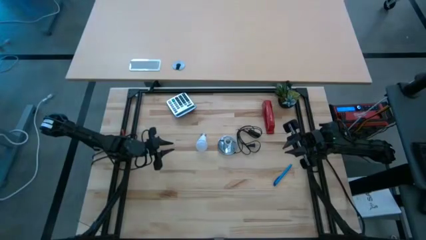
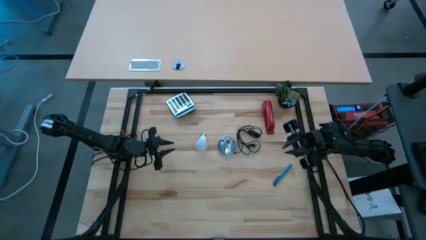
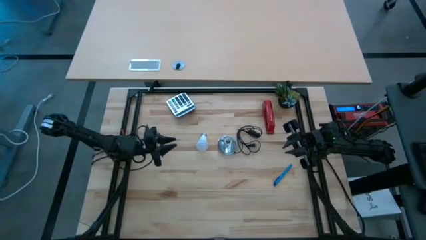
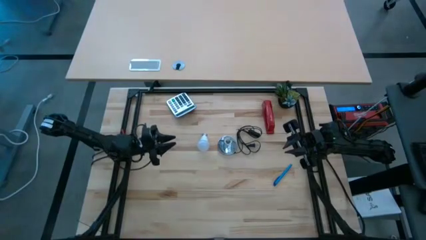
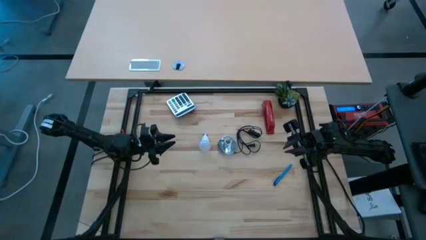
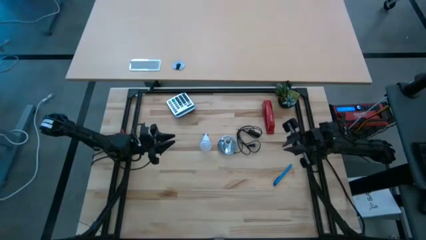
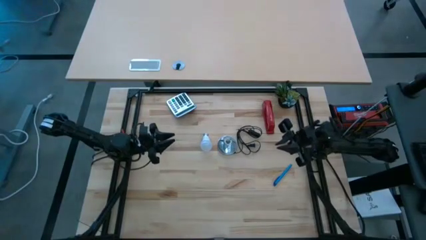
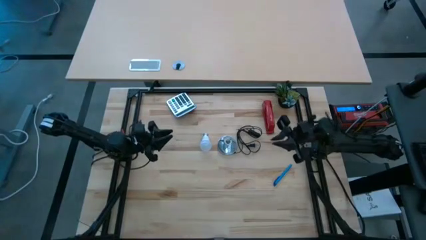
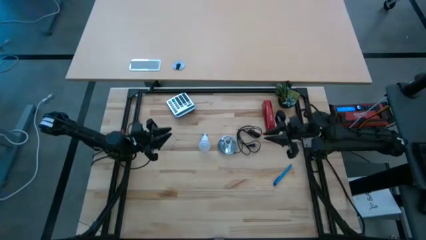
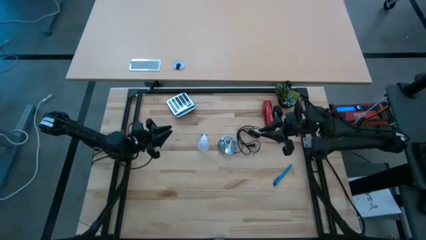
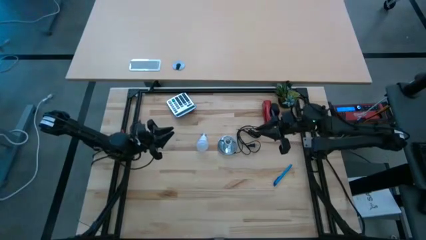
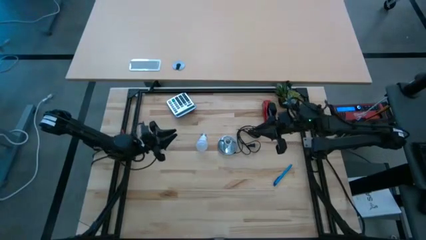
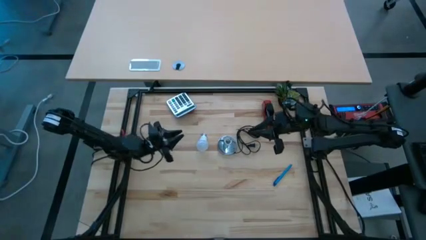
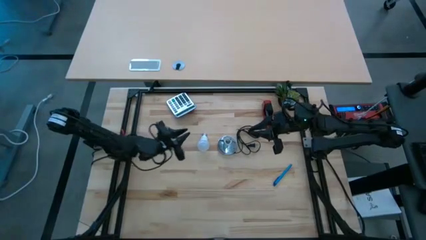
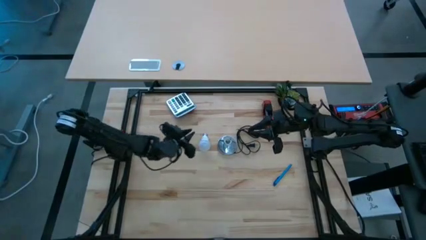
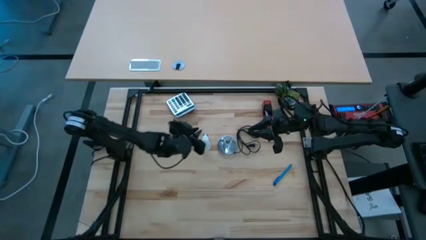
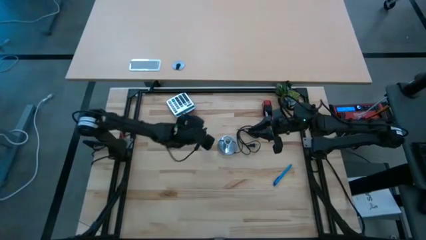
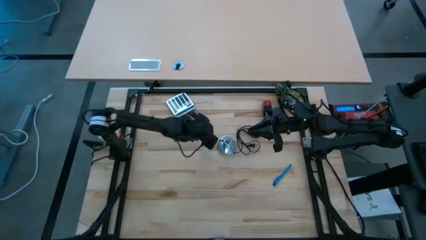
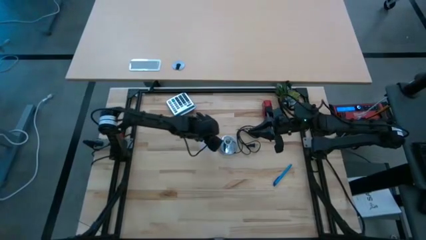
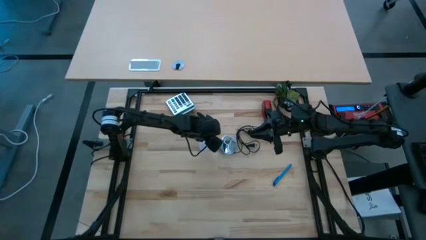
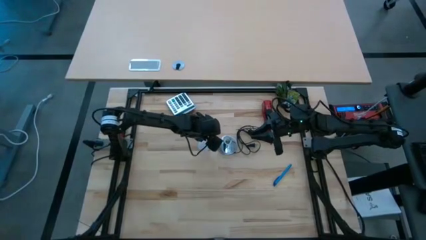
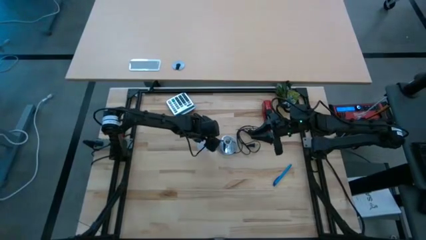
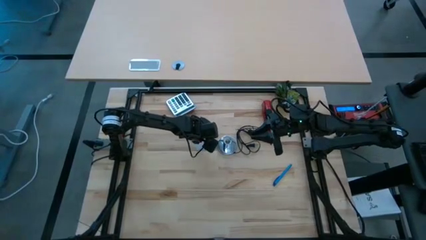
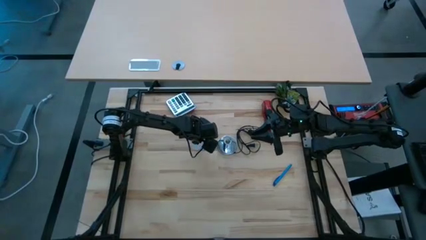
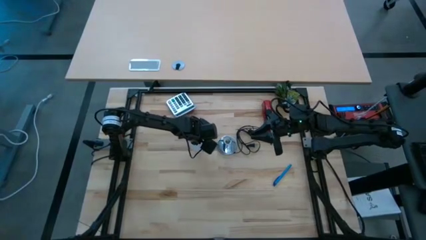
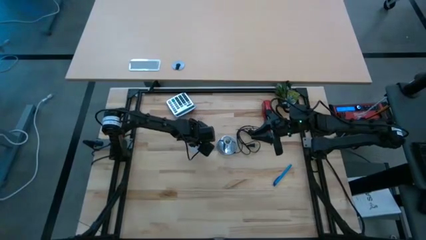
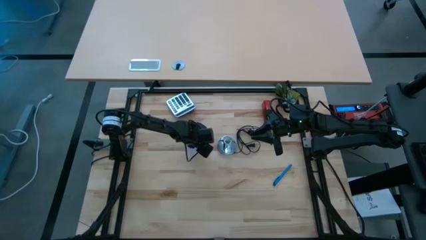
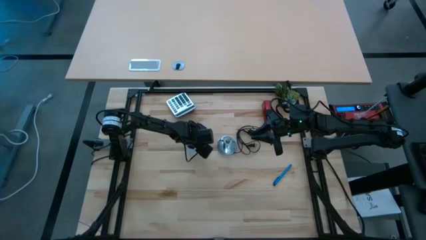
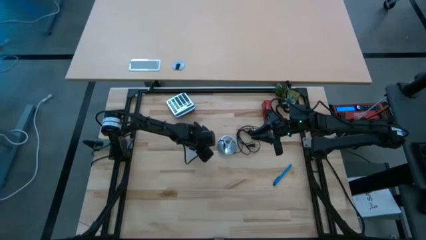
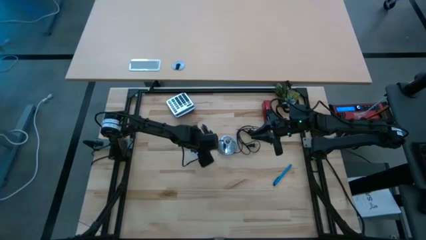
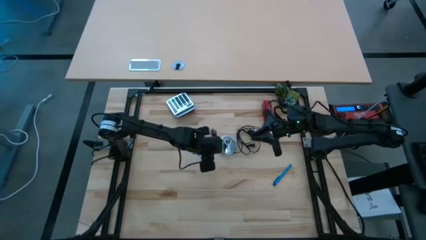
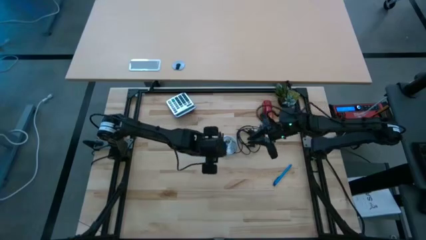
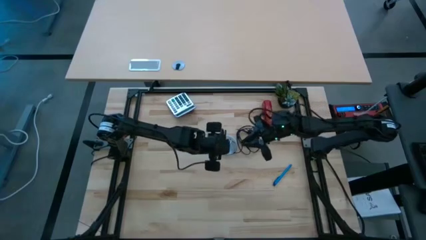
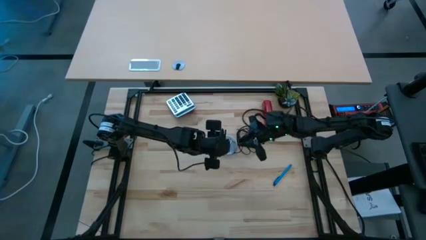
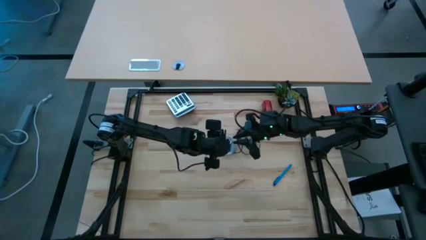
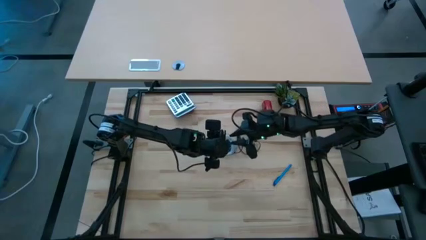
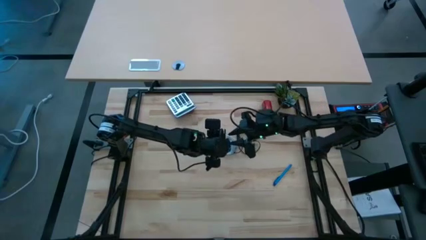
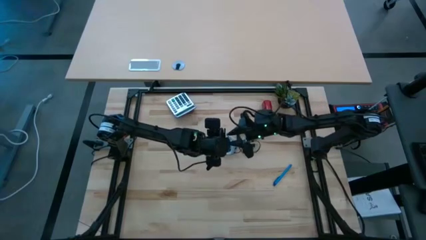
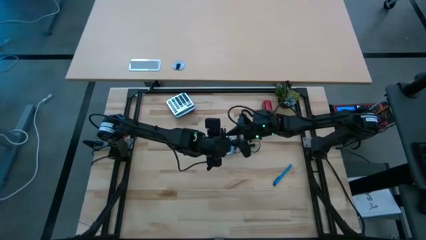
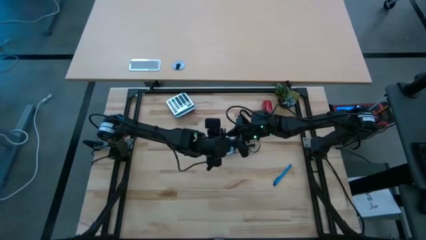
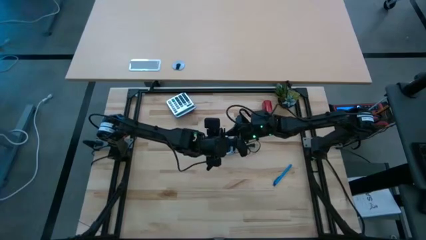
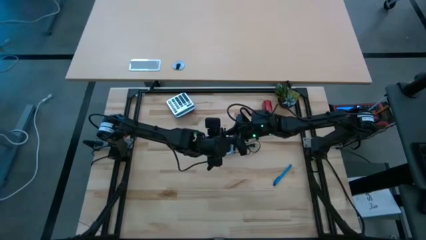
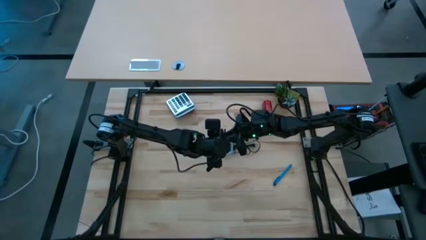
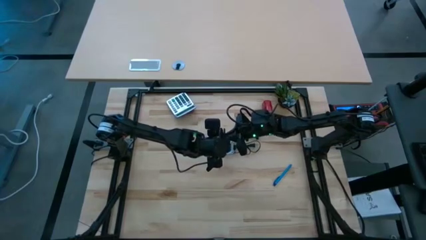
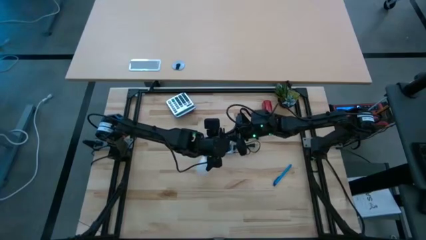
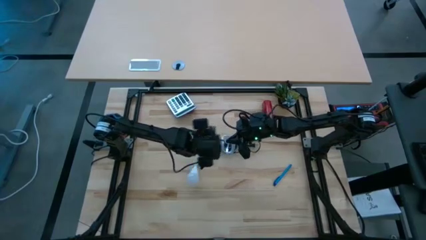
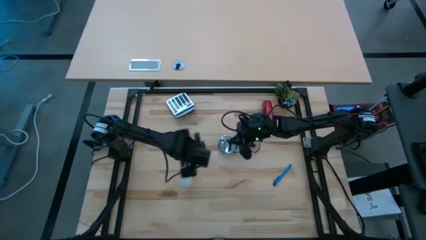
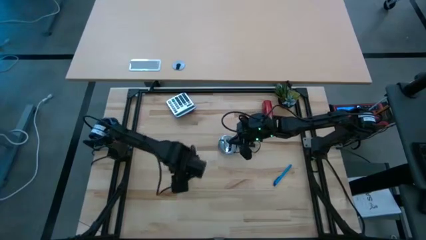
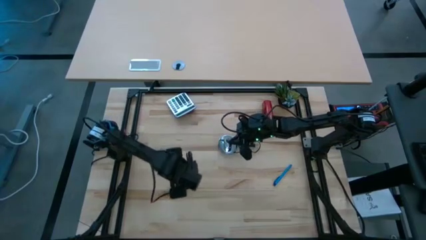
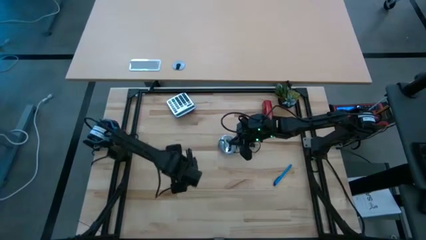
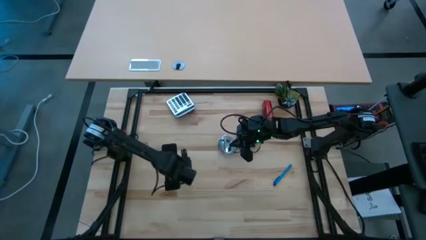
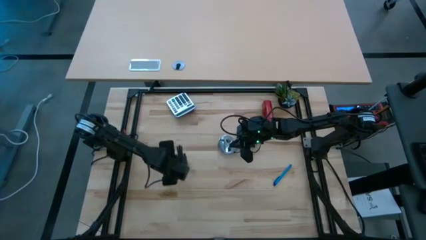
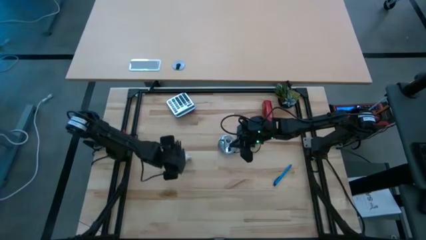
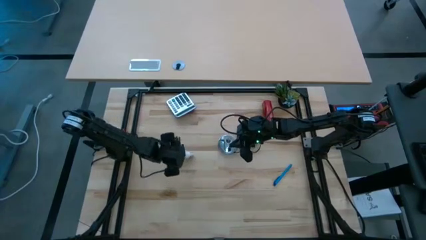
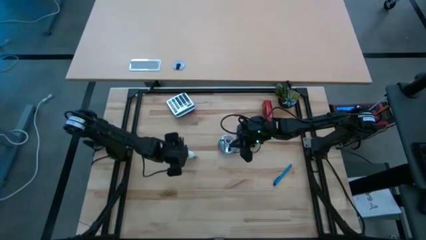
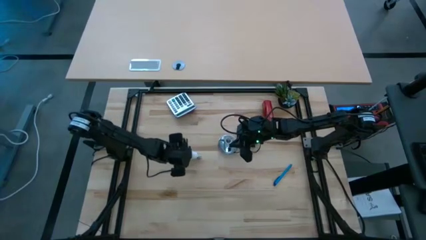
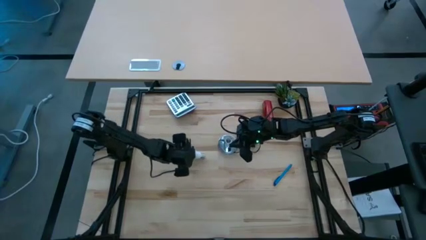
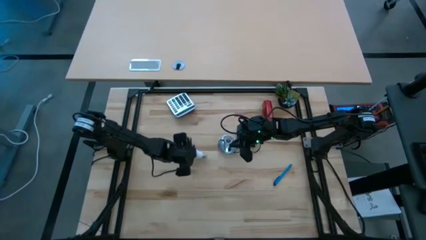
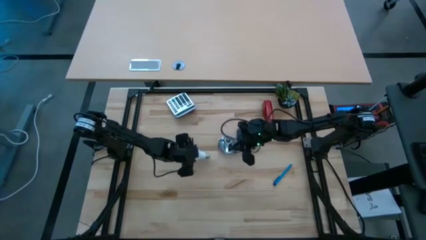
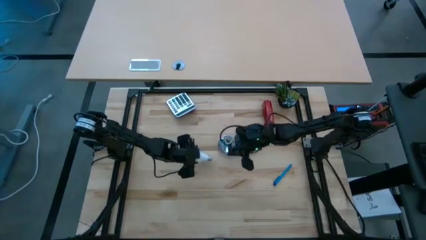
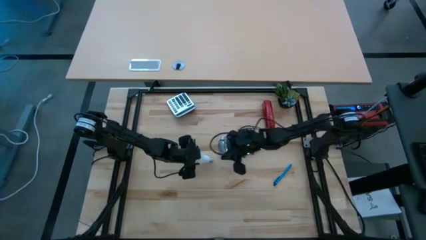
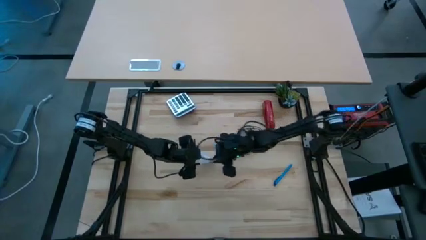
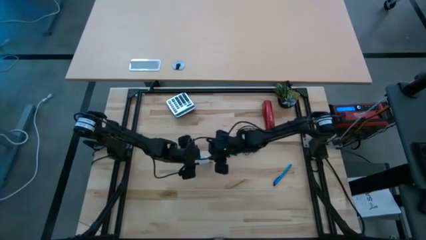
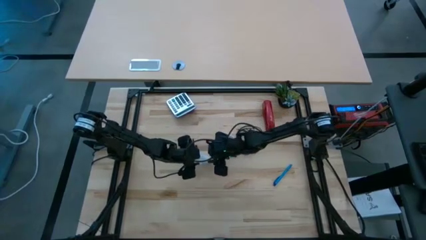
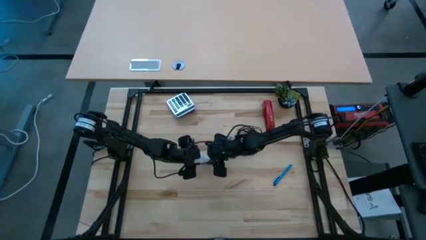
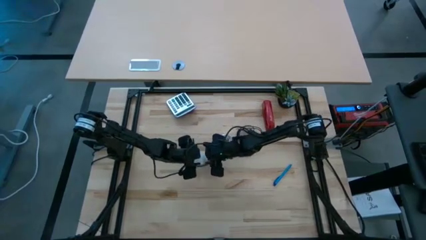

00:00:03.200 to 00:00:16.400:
Task: Screw lightbulb
Insert the white lightbulb into the silver lamp
